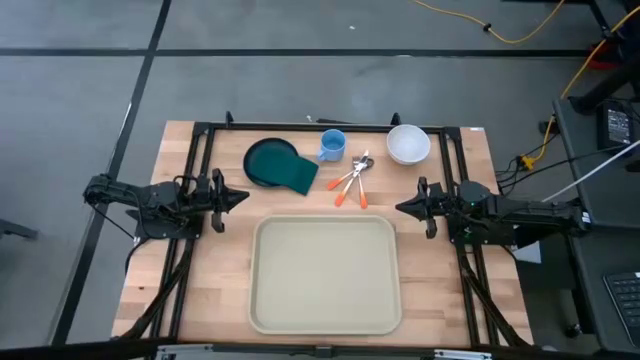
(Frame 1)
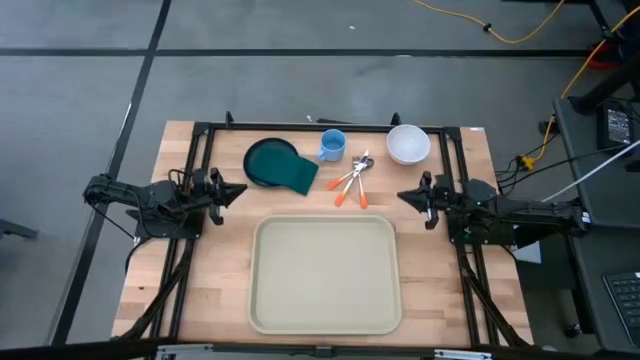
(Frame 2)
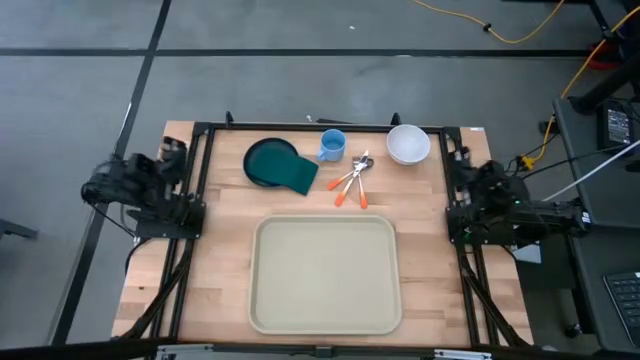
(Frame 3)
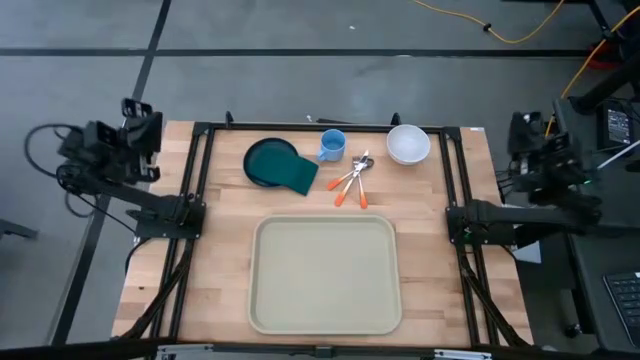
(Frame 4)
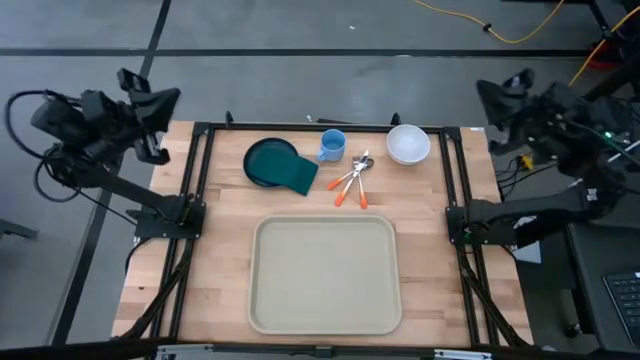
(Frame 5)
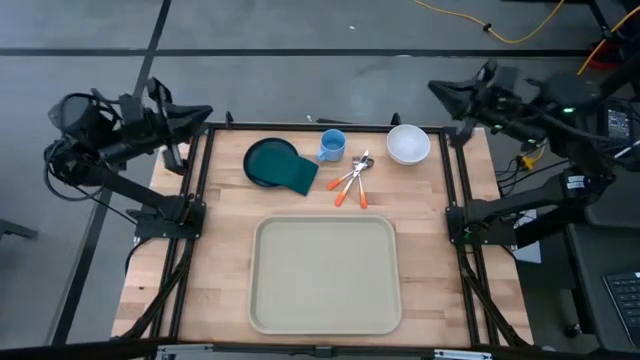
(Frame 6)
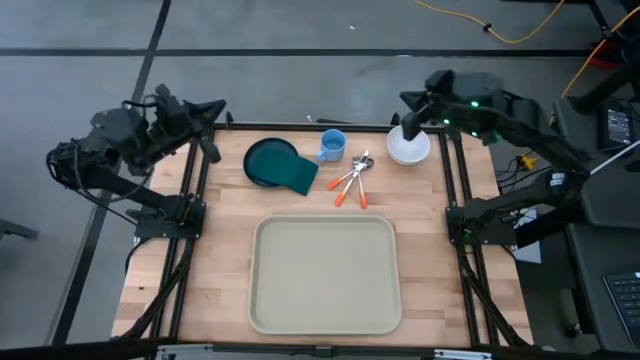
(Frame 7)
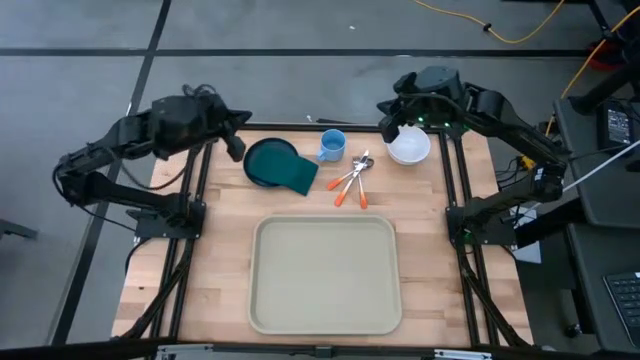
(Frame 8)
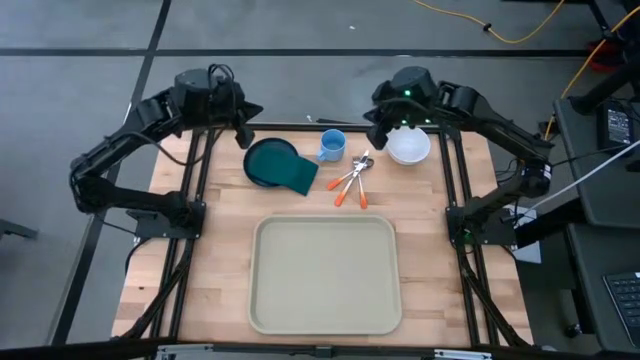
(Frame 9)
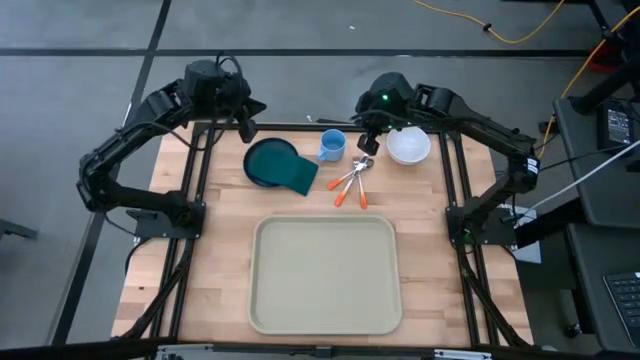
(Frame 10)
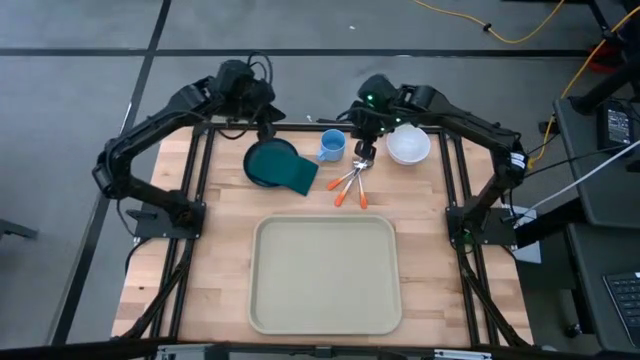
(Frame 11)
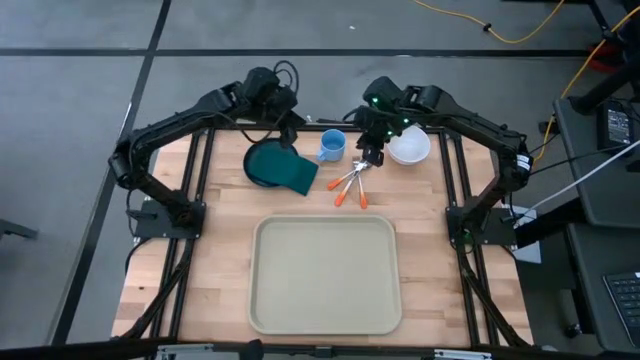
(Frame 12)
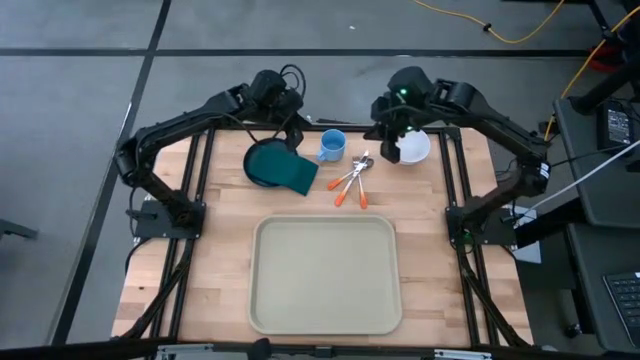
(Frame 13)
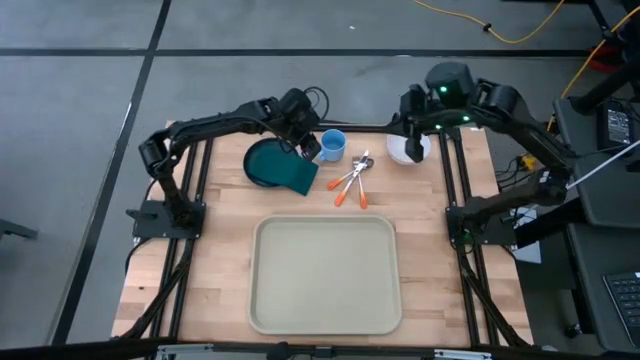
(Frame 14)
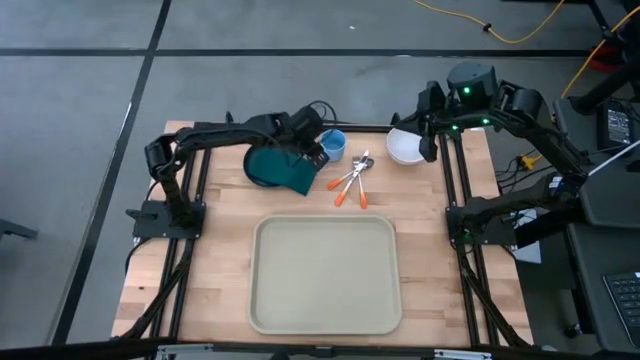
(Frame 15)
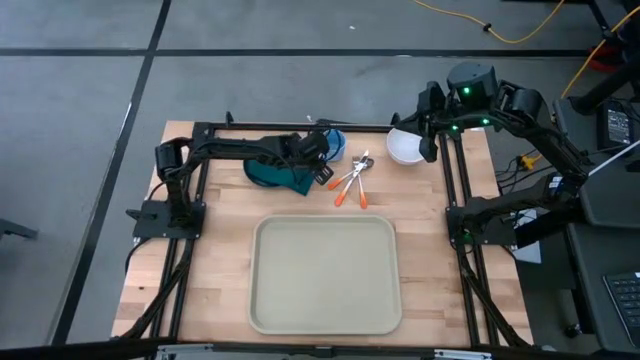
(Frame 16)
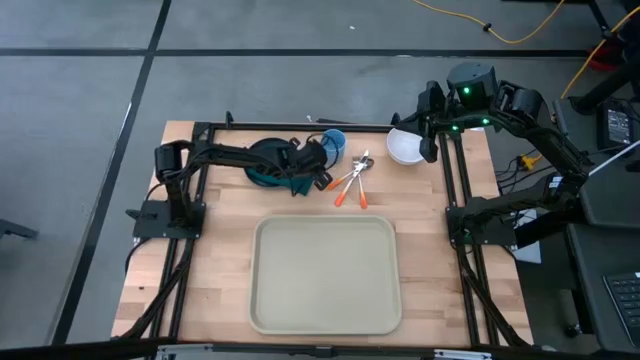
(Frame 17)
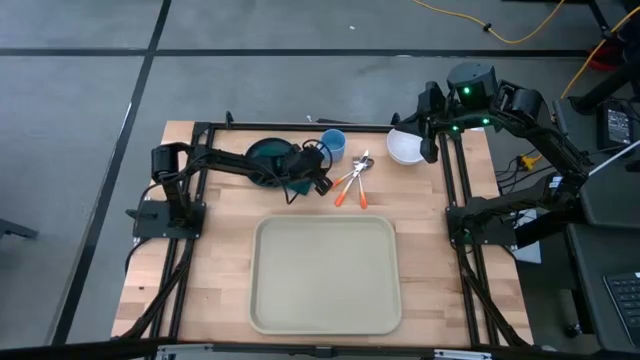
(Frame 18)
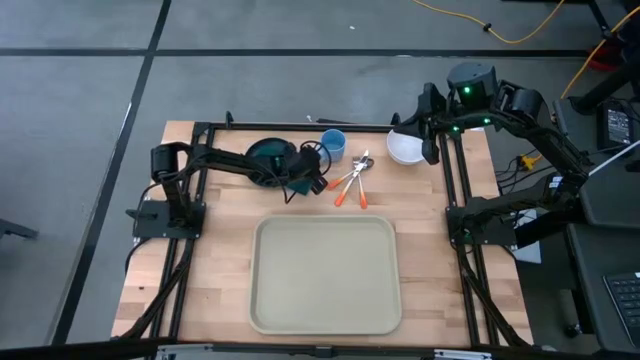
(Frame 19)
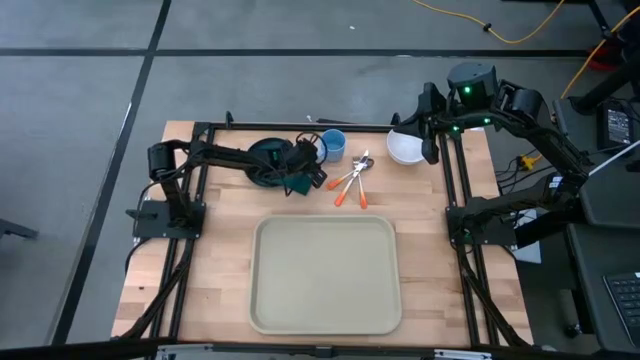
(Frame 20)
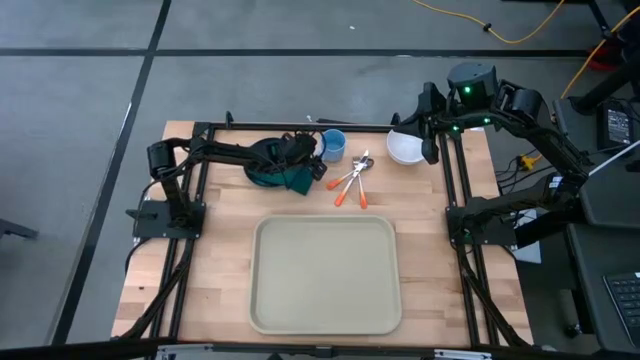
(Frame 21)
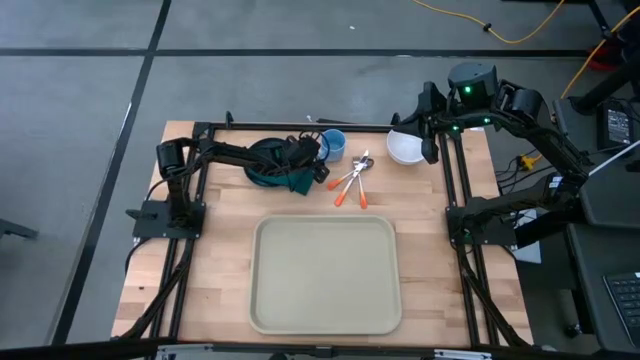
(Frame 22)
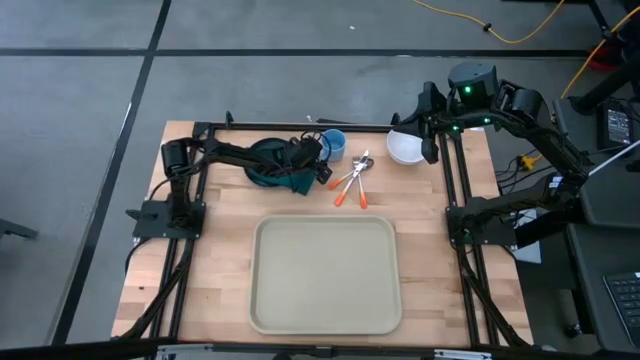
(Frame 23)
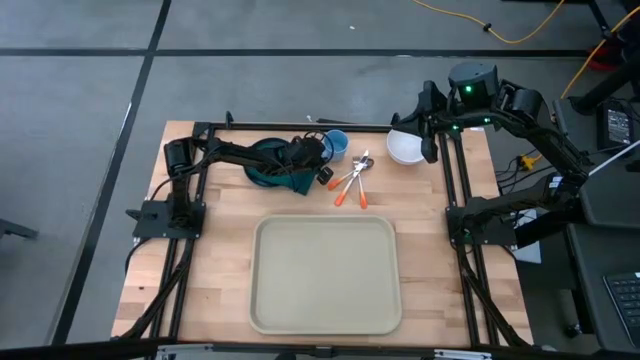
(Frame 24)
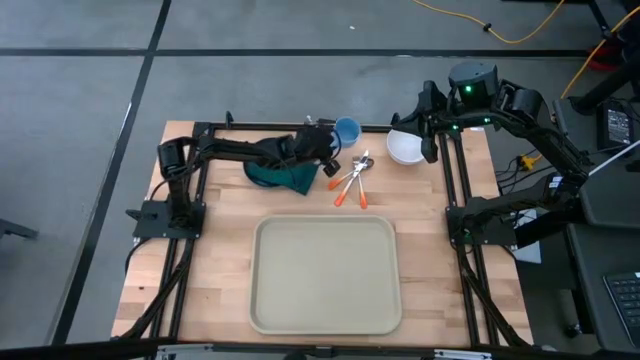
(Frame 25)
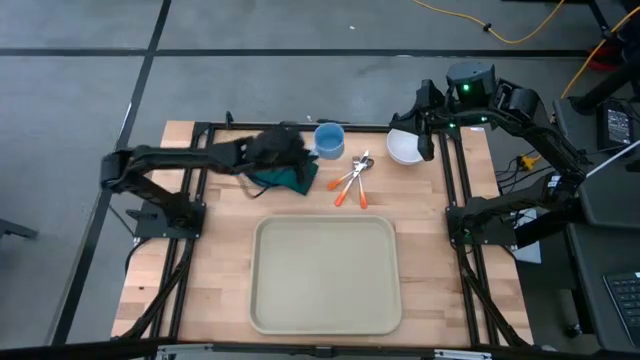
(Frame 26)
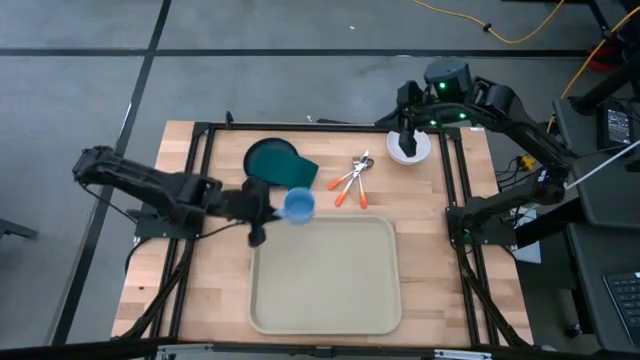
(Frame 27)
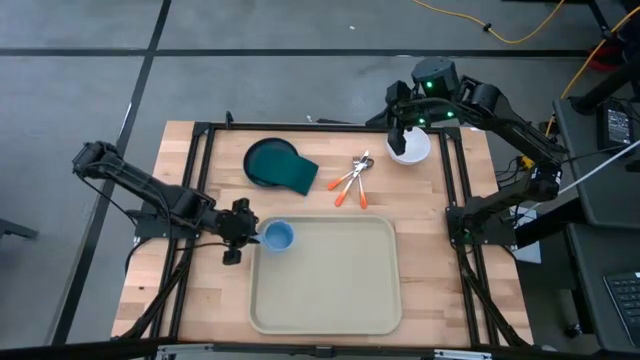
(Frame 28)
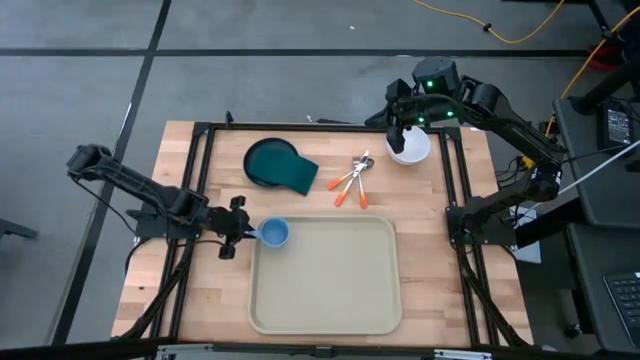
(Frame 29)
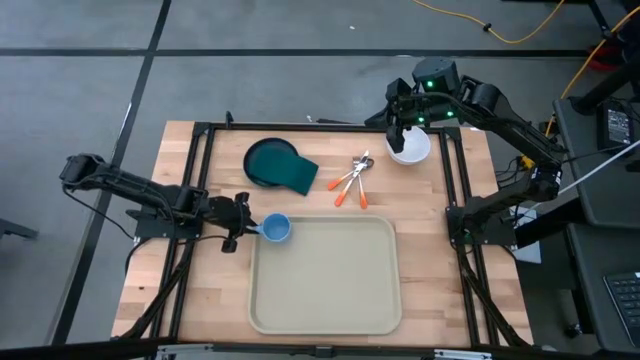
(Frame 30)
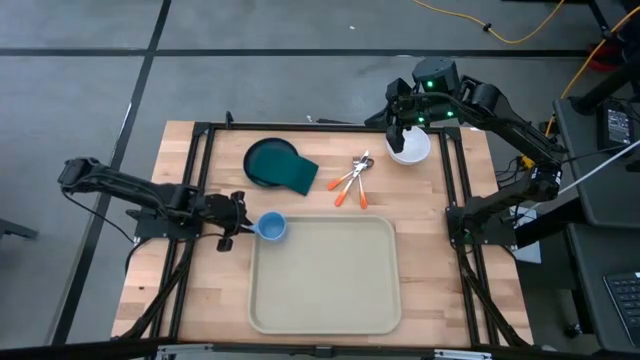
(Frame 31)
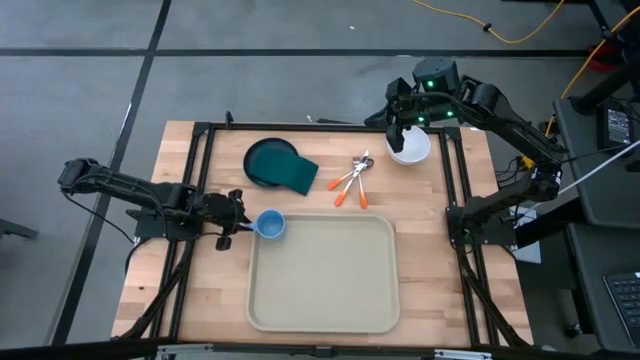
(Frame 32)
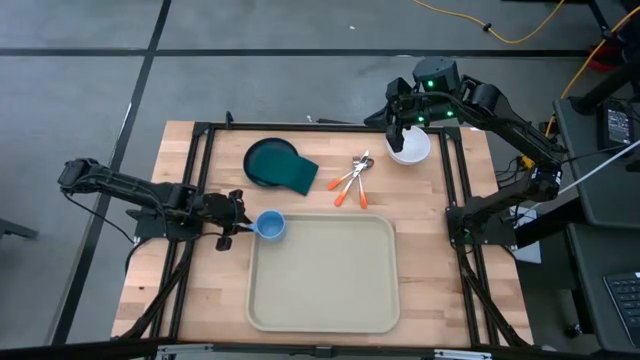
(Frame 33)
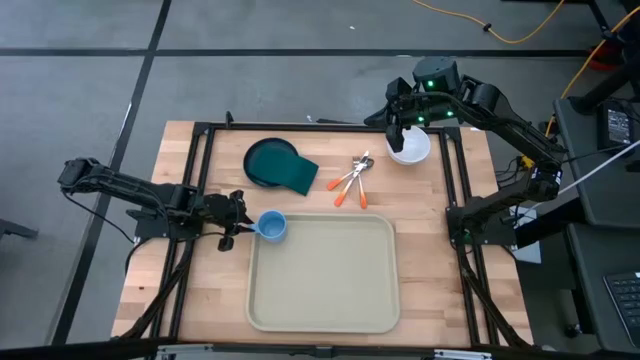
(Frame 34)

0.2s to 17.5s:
Task: Set up tray
Put the blue mug on the top left of the light brown serving tray
